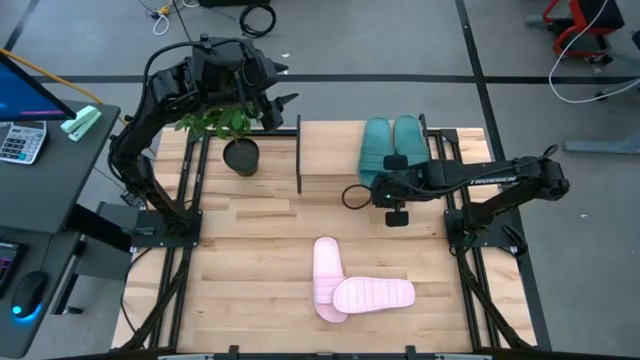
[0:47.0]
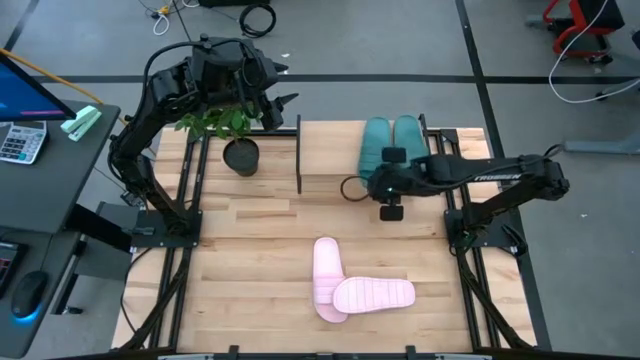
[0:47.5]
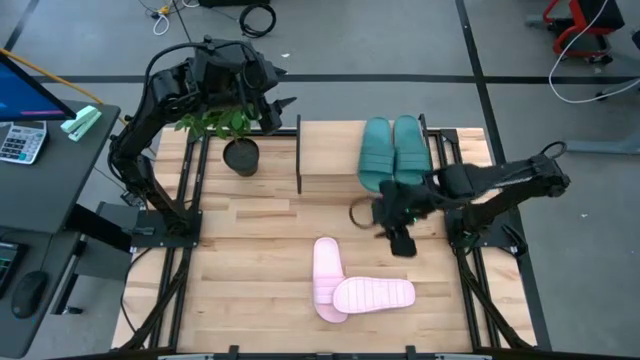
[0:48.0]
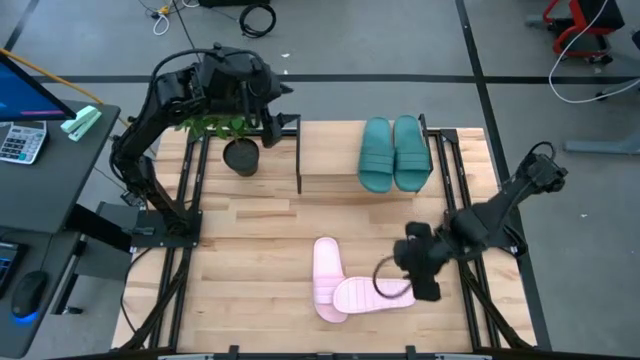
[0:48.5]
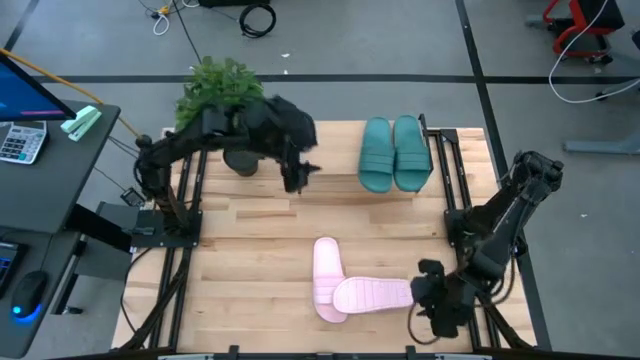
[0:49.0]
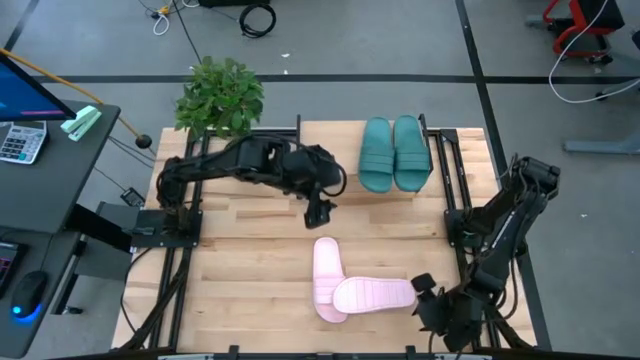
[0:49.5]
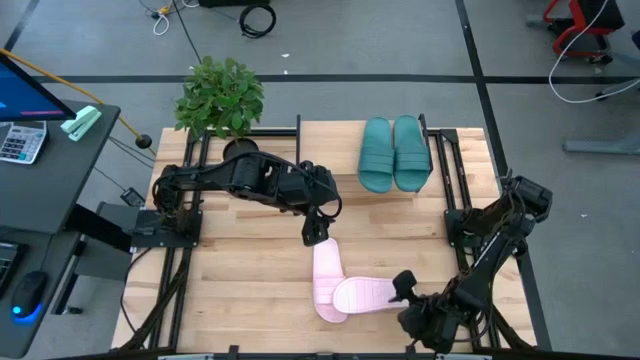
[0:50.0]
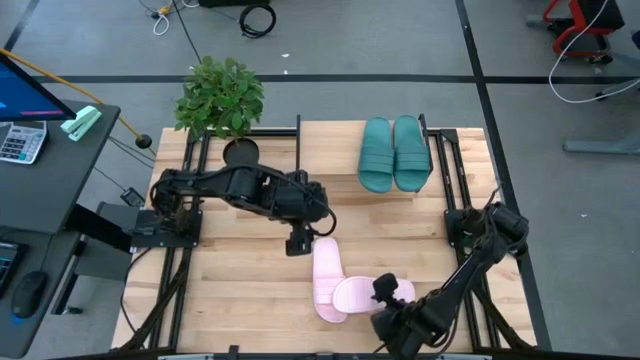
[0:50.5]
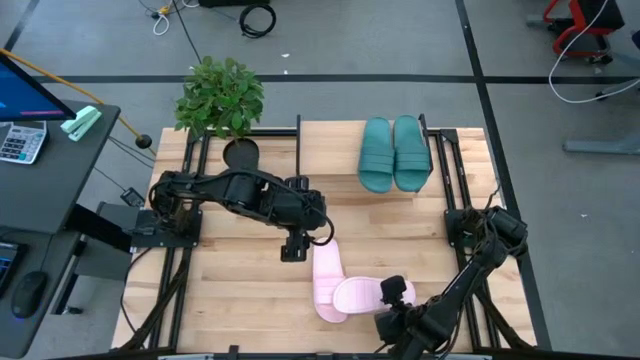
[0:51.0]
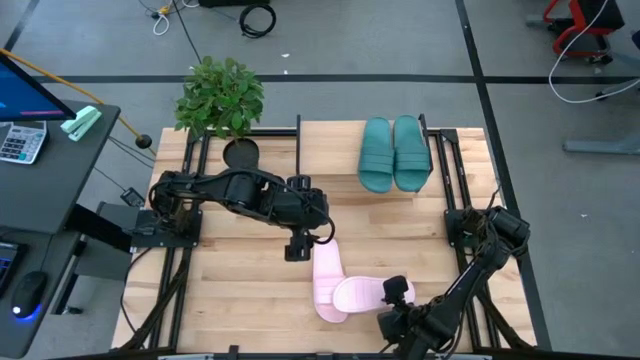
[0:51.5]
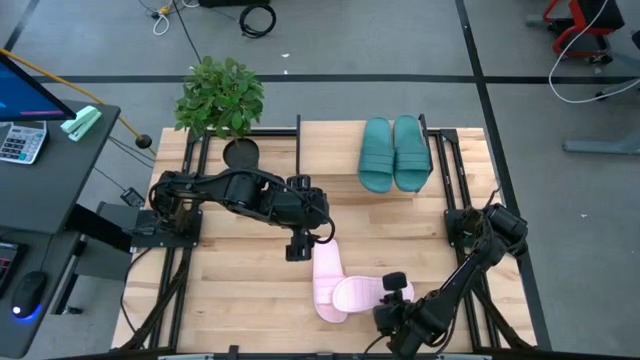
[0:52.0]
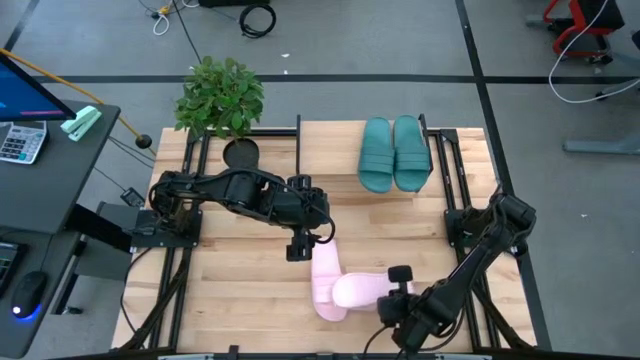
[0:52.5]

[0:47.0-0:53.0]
Task: Pick and place slides into the shelf
Put the right pink slipper on the shelf

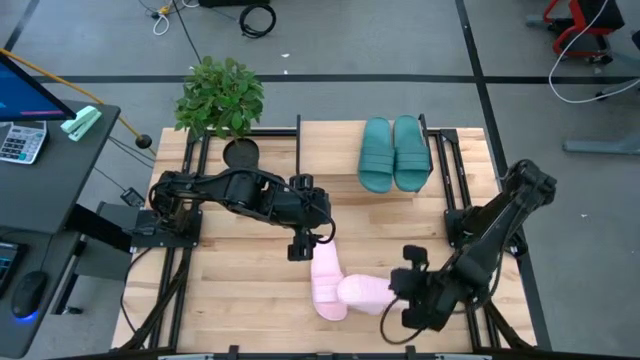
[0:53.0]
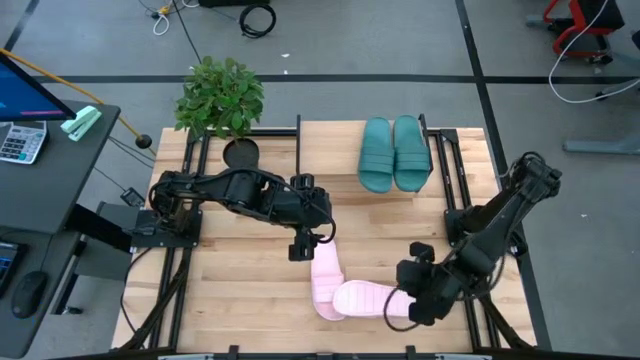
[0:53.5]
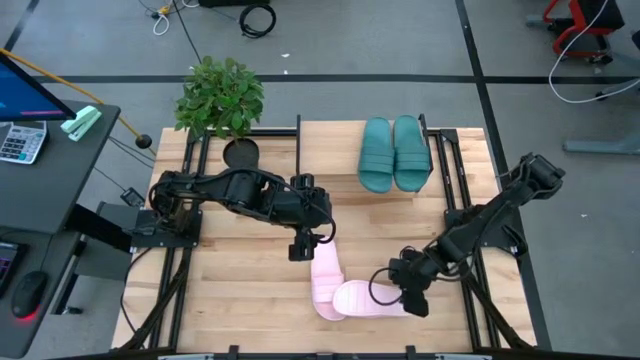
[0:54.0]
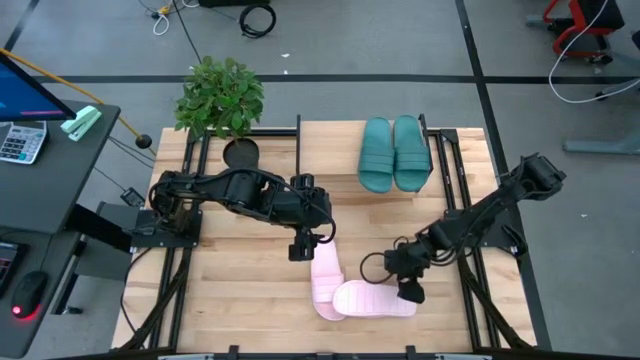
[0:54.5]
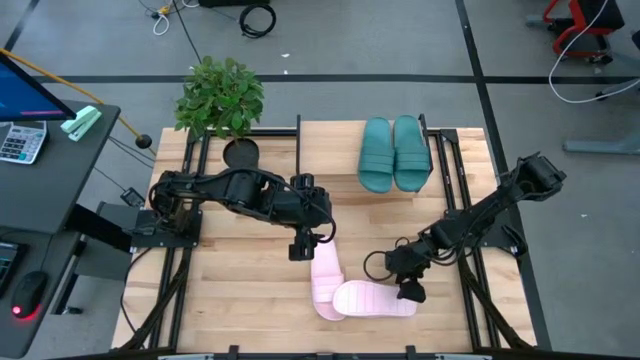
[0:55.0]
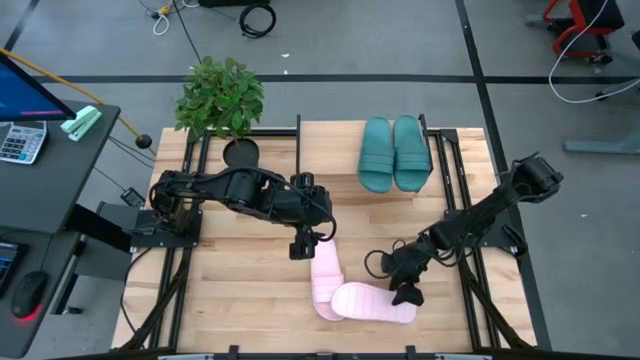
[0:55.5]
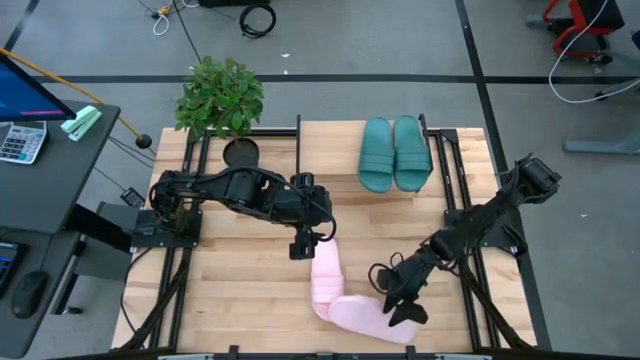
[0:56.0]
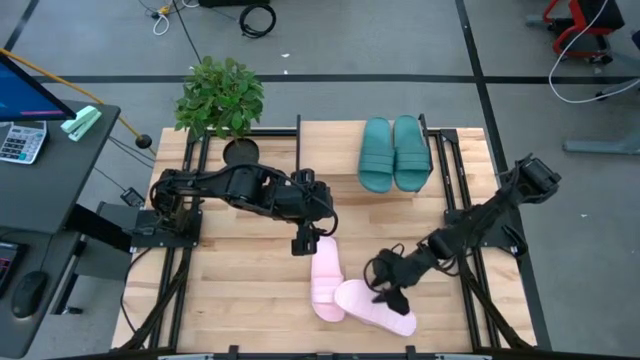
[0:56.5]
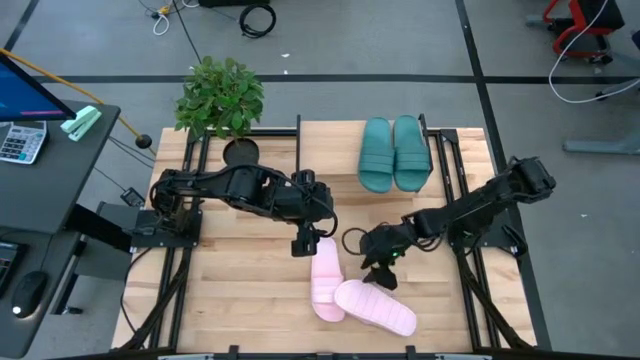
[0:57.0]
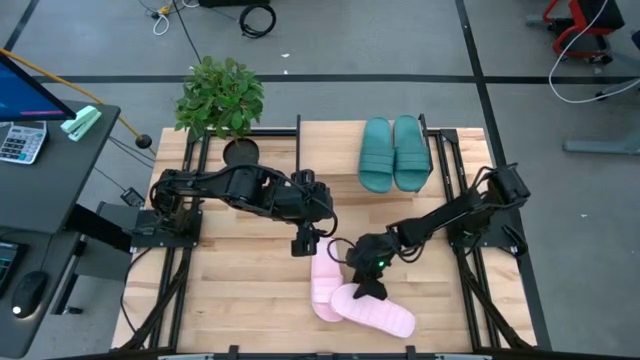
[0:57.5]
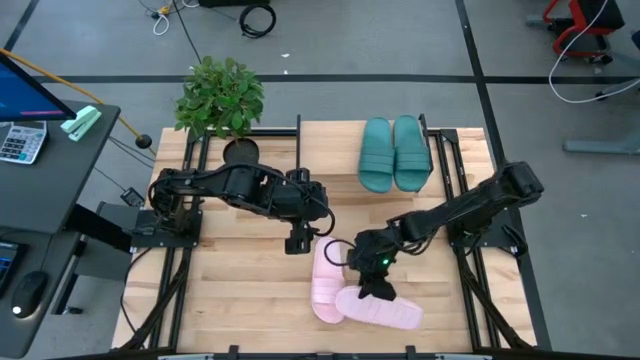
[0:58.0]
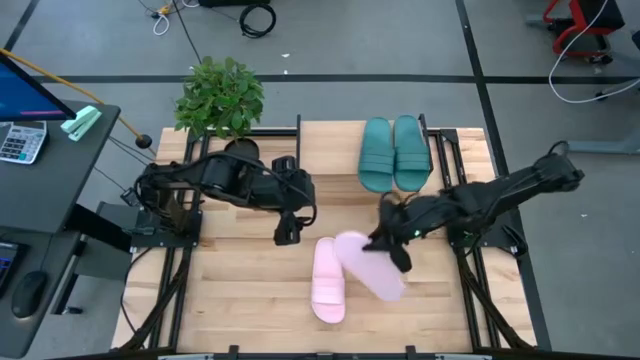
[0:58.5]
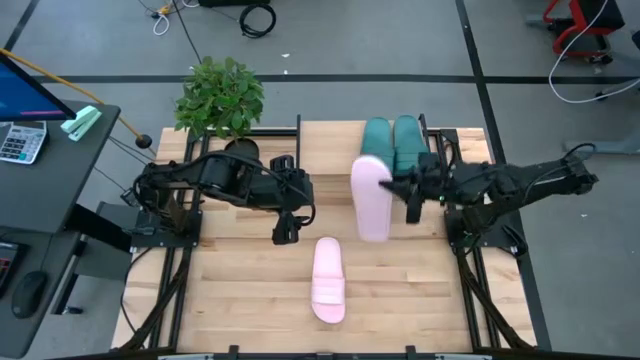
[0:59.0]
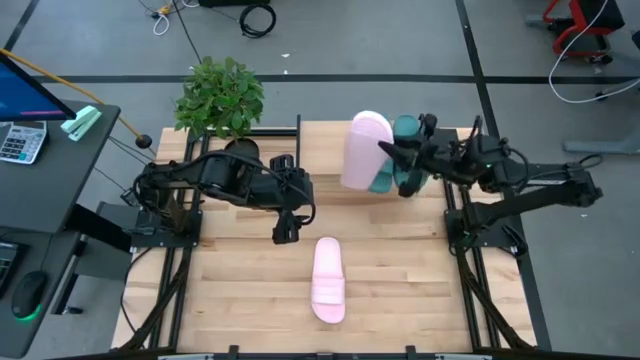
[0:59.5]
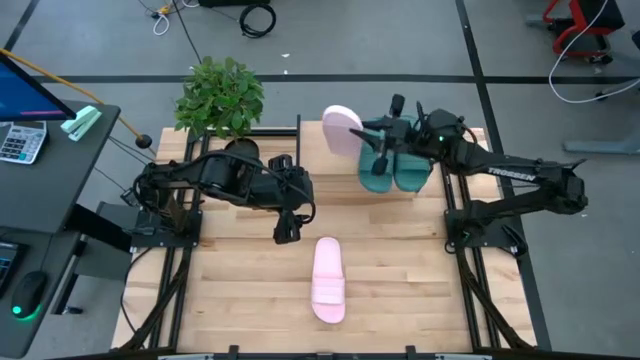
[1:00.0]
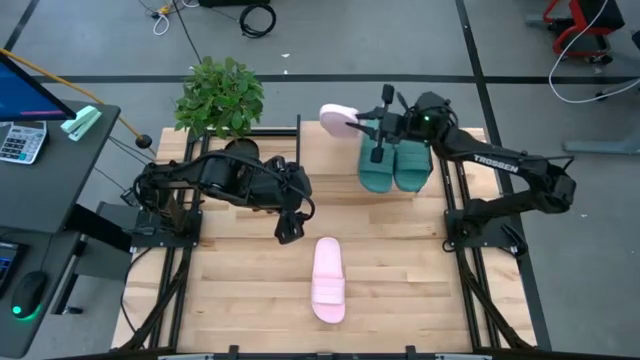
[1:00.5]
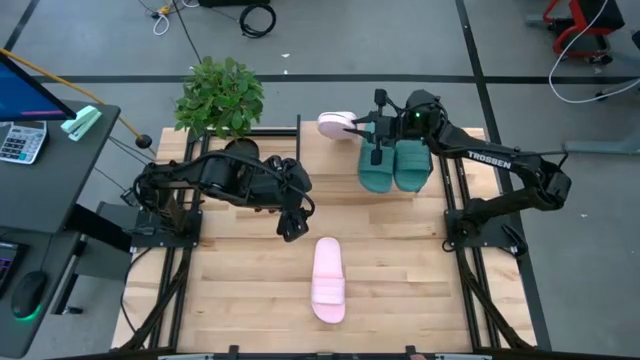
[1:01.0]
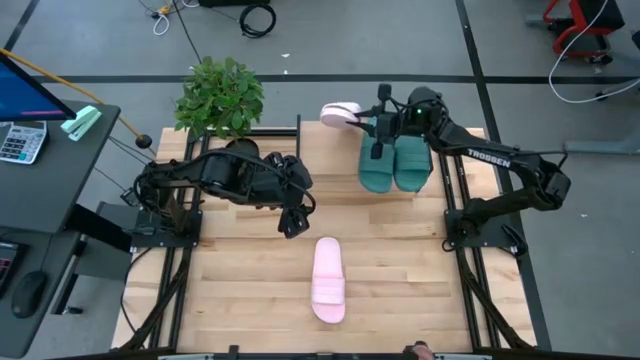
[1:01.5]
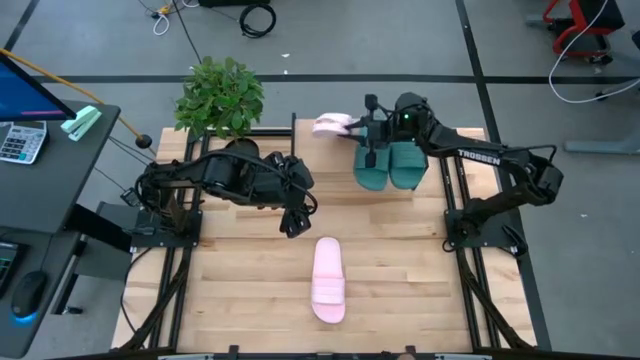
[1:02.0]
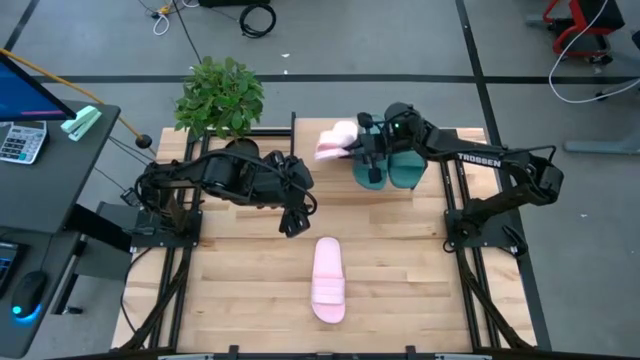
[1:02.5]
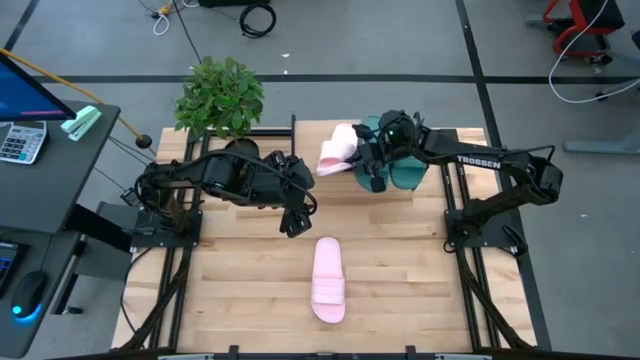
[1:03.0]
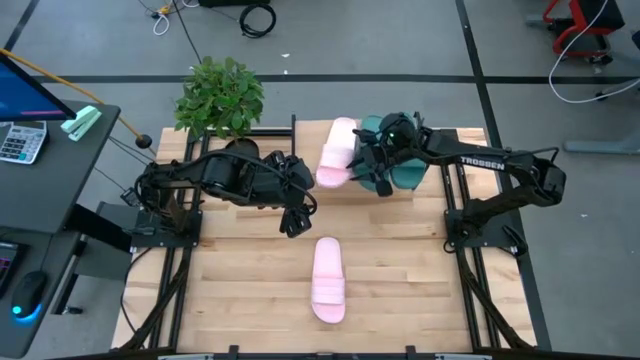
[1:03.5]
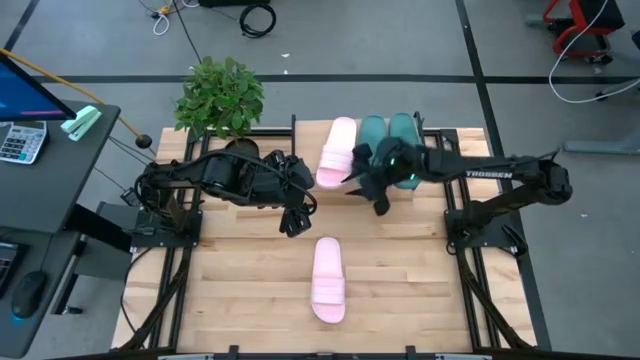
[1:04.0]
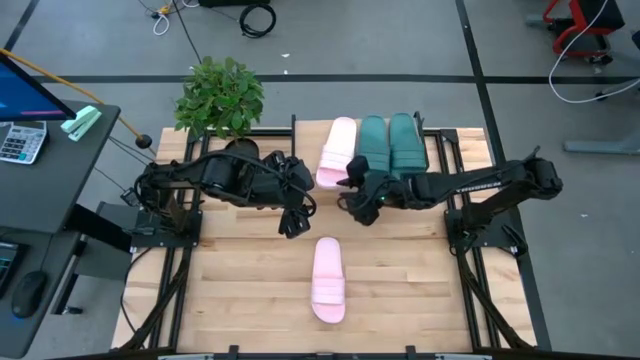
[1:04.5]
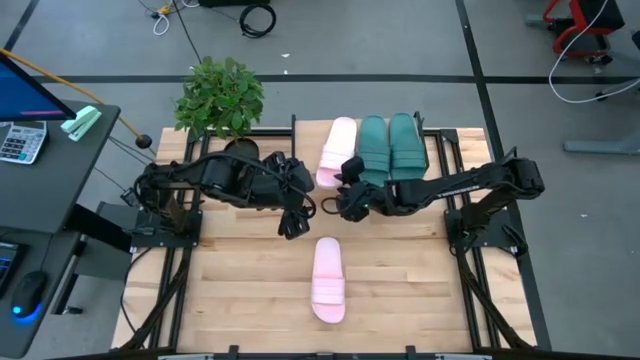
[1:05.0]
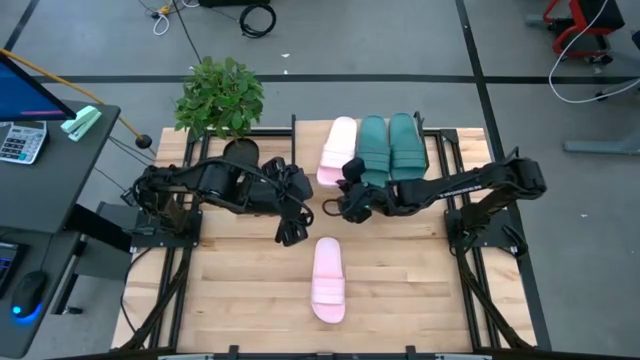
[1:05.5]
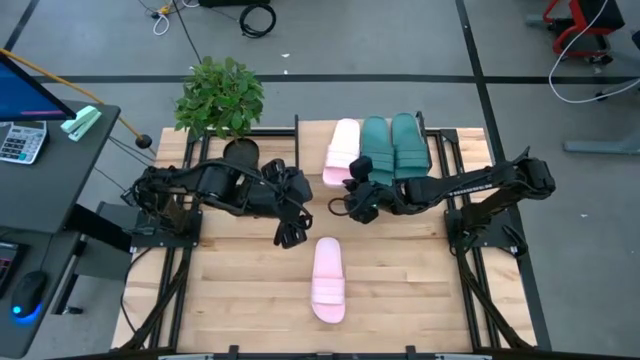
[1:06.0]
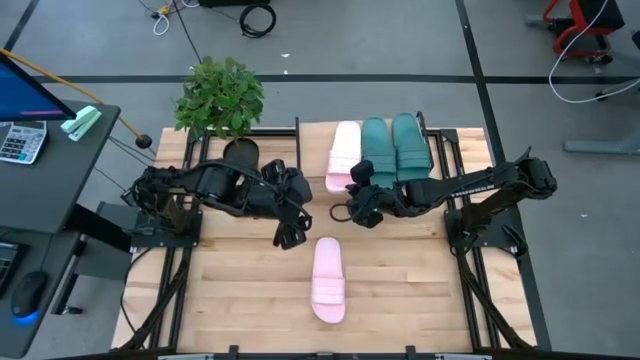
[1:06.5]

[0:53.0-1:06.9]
Put the right pink slipper on the shelf

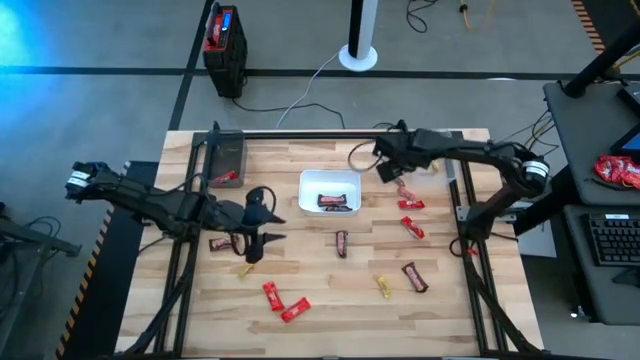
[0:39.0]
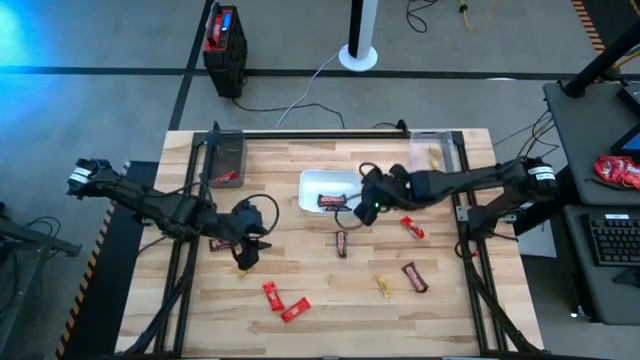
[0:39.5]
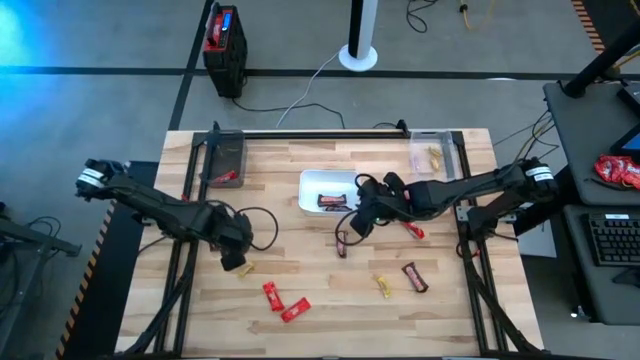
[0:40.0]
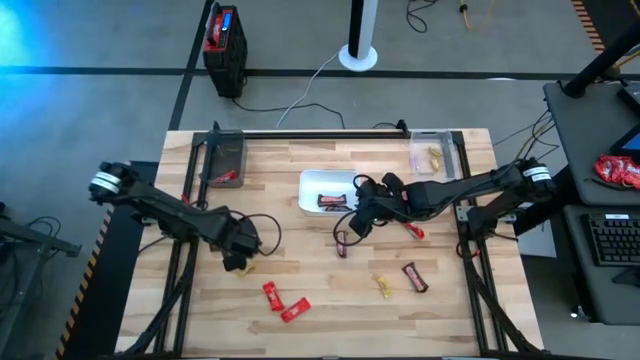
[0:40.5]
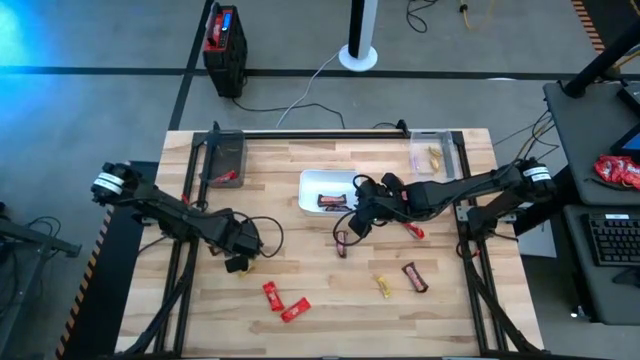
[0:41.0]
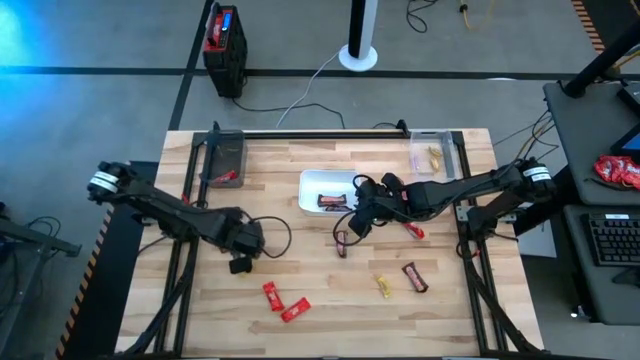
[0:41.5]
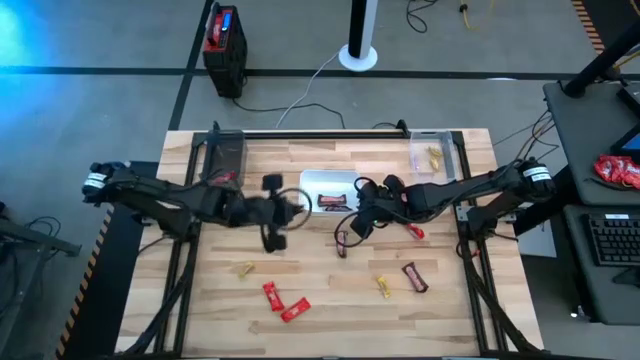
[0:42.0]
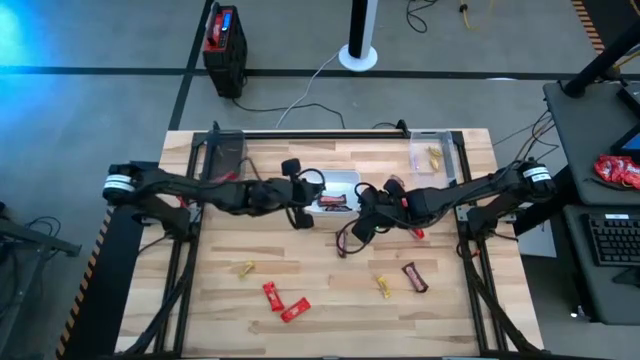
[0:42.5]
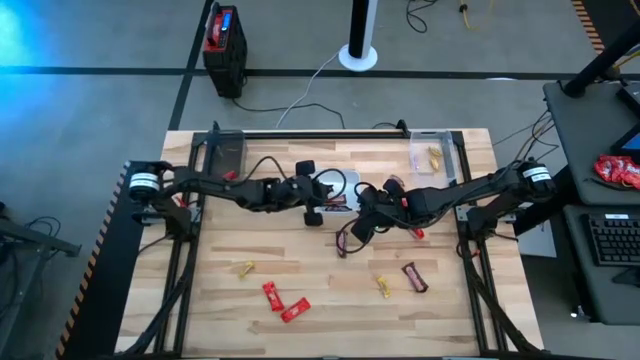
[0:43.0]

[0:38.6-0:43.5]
Task: Sort candy by brand, put in halloween buckets
Put the brown chocolate bar into the white bin
